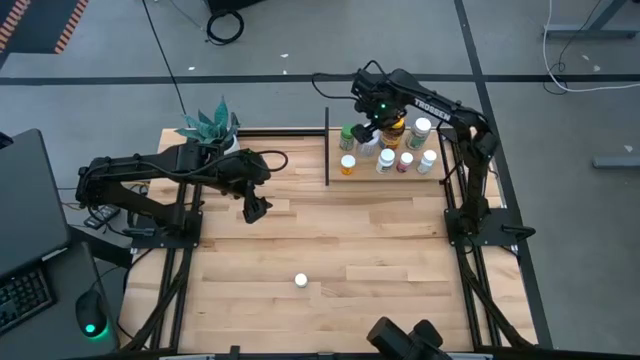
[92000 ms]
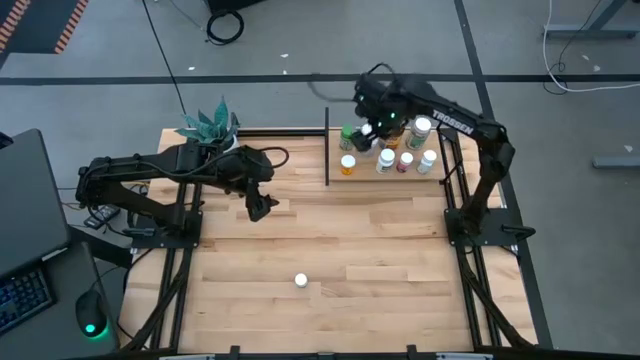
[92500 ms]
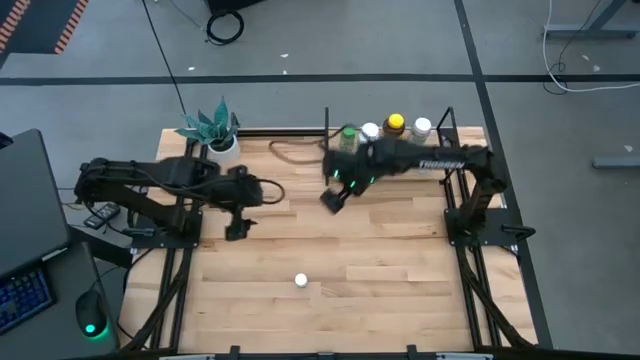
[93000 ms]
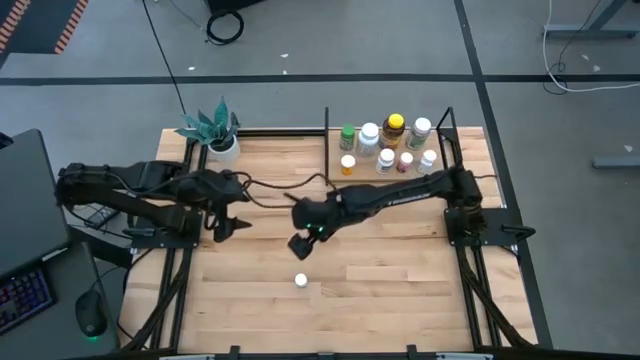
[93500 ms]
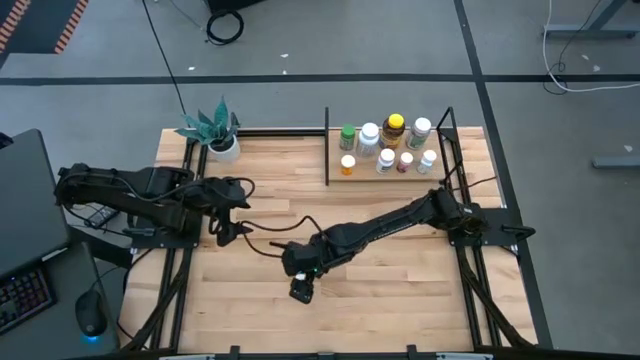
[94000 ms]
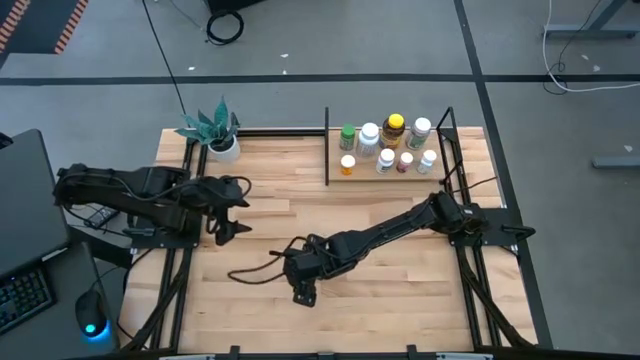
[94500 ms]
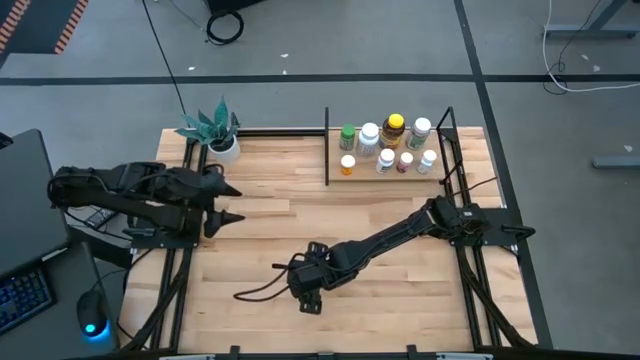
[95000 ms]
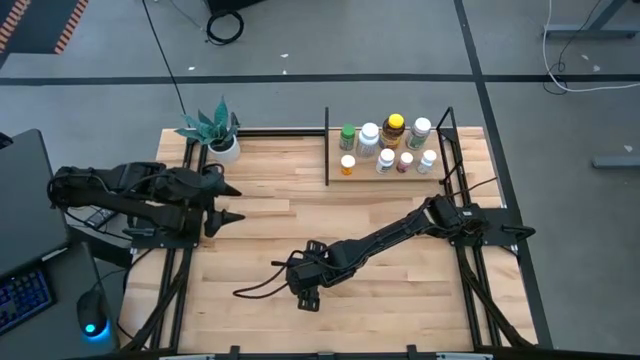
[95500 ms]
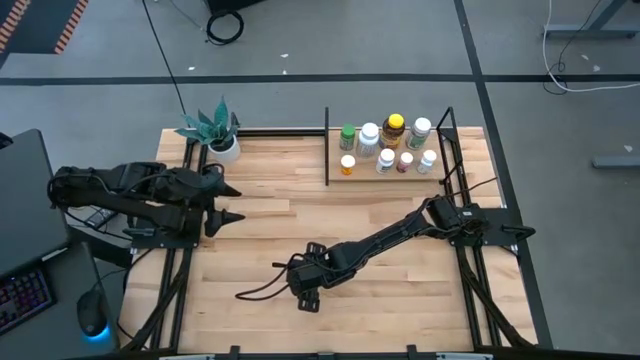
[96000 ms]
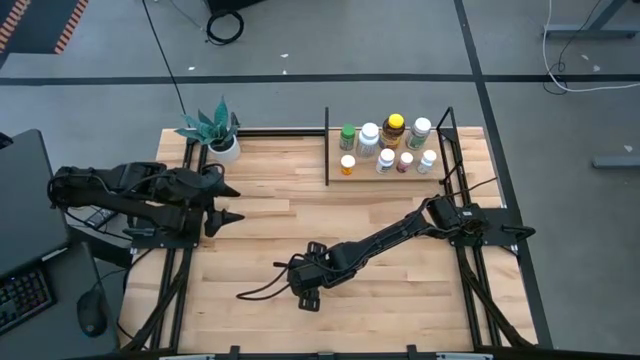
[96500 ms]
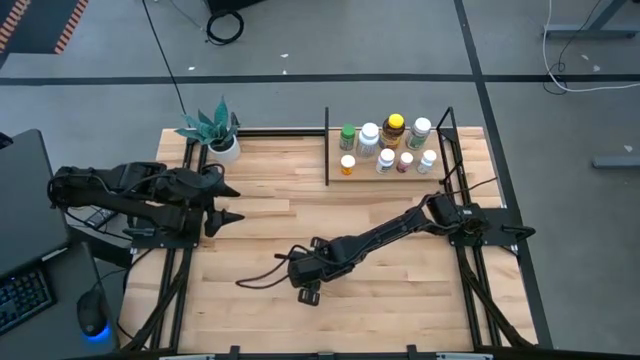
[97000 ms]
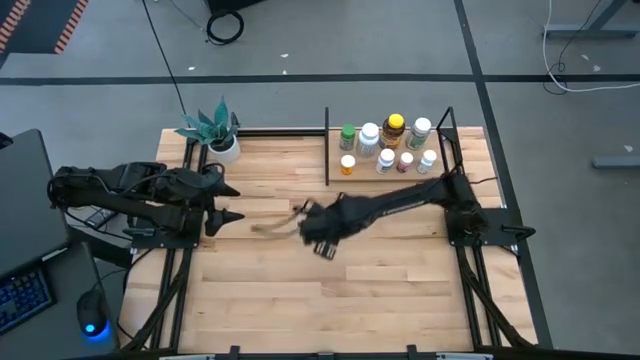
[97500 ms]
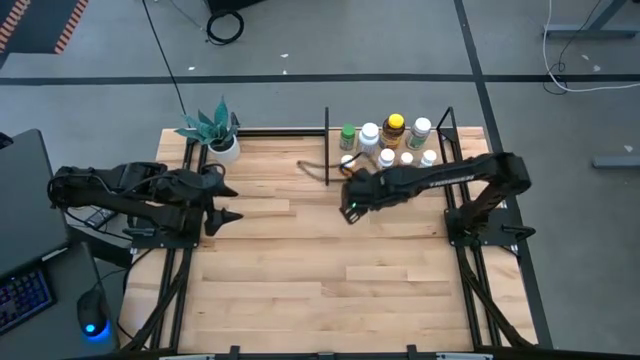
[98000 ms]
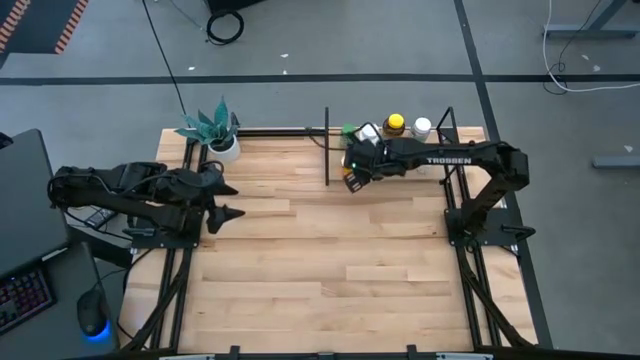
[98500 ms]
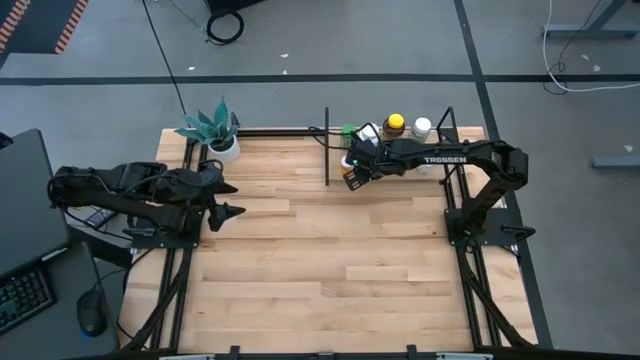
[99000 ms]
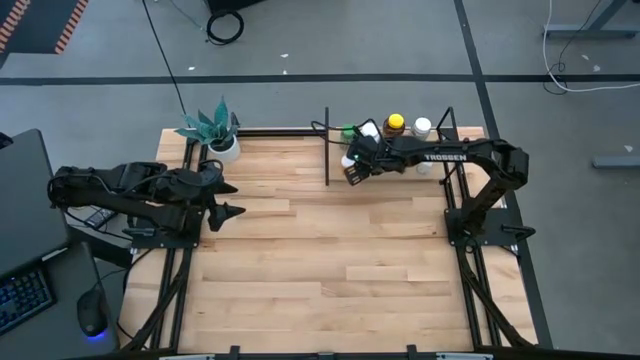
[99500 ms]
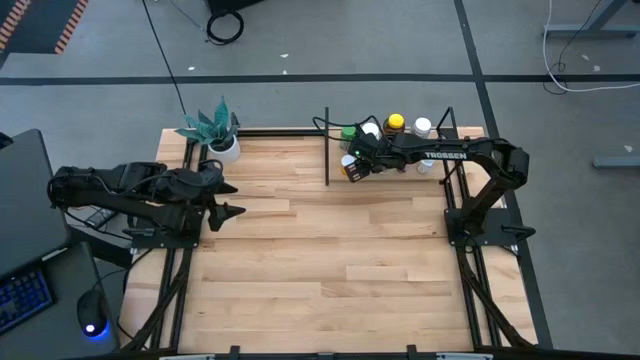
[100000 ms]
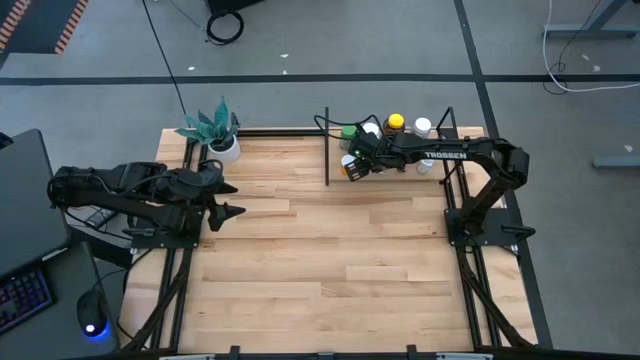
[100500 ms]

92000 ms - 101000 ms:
Task: Pick and place medicine bottles onto shelf by color
Put the black pill bottle on the shelf

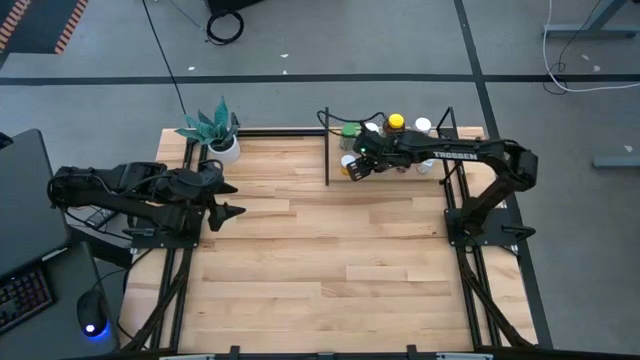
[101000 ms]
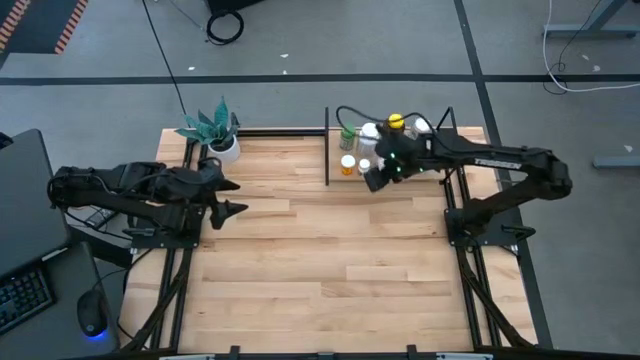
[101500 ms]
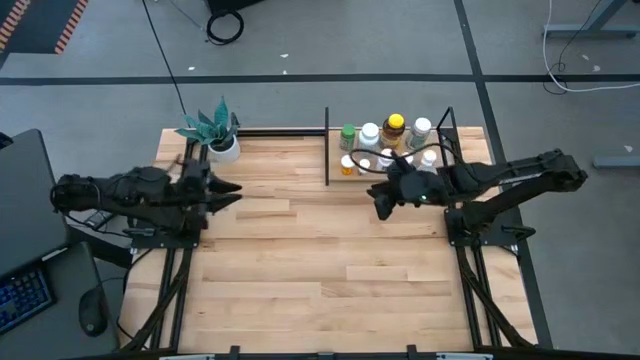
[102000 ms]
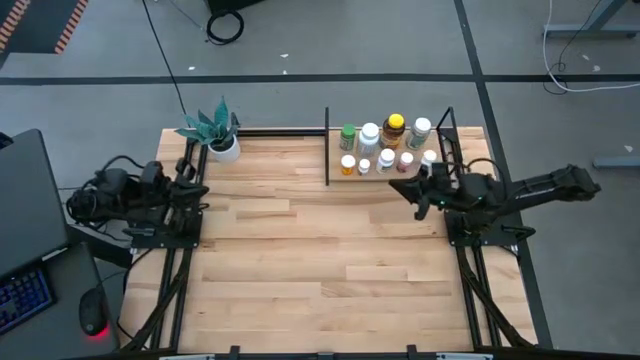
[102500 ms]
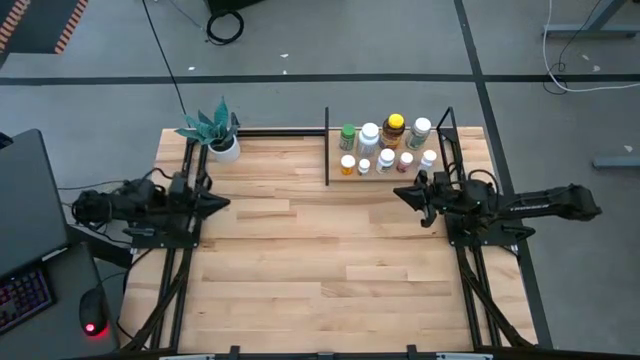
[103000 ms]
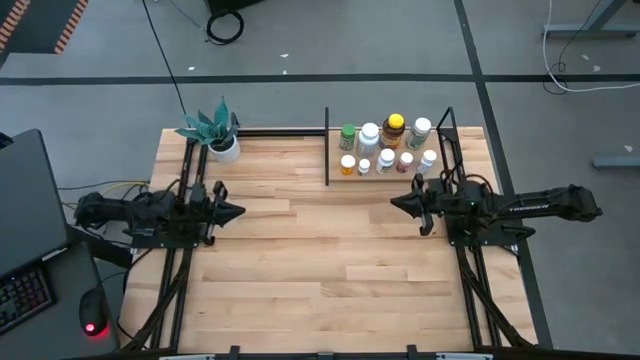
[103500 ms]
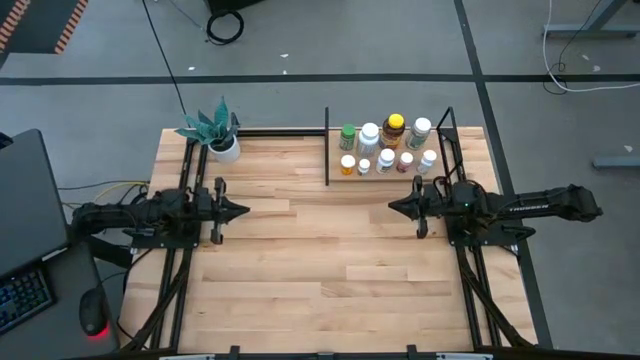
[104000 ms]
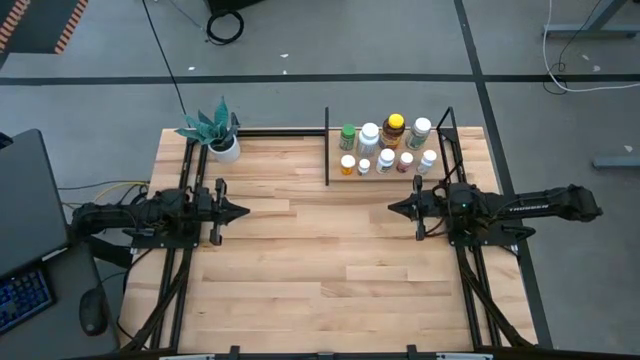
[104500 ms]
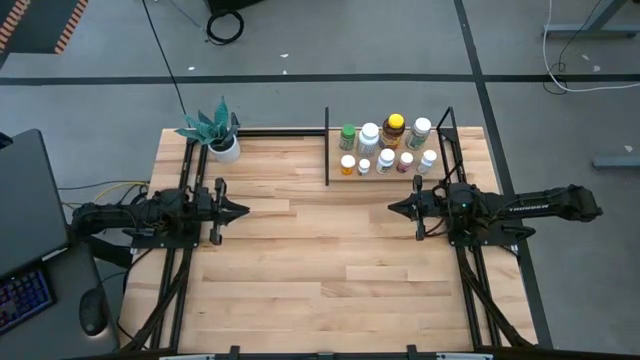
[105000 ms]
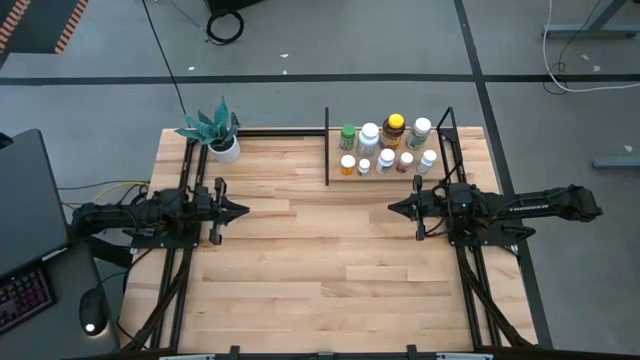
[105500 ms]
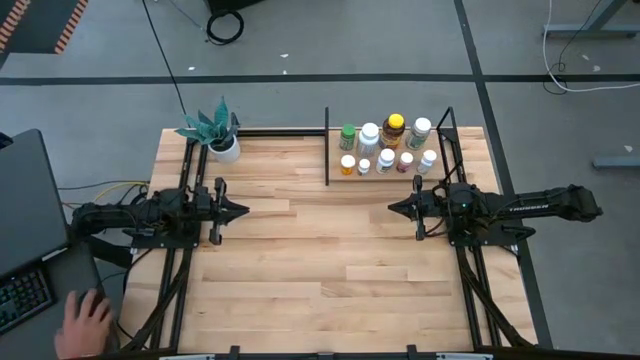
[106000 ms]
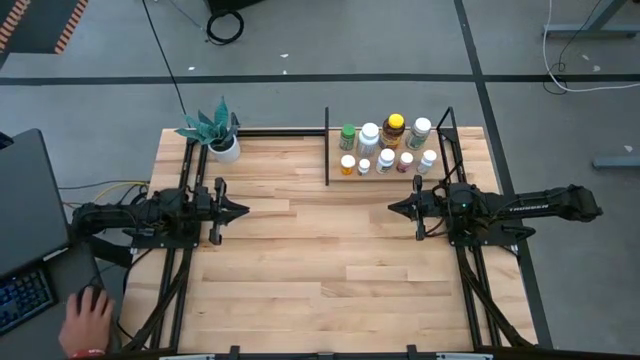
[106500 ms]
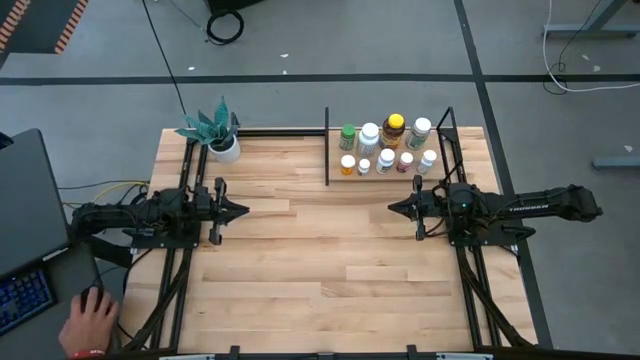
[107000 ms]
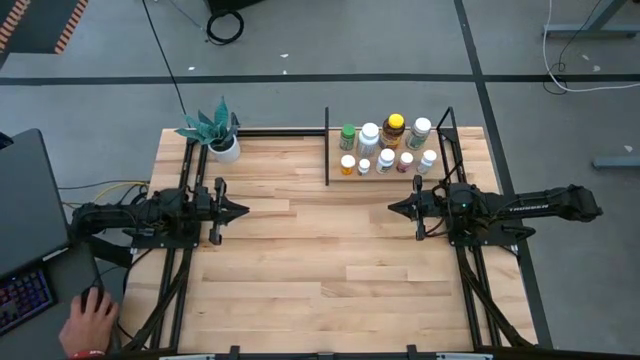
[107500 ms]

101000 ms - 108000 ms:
Return to Home Position

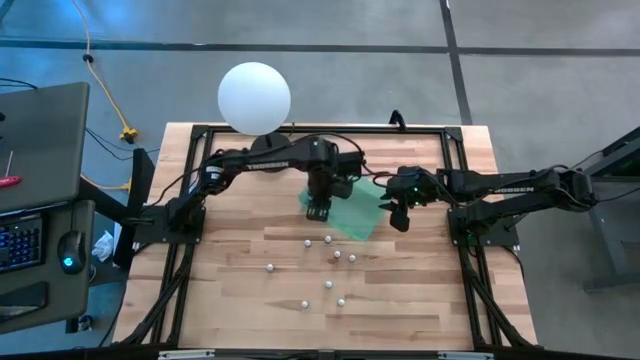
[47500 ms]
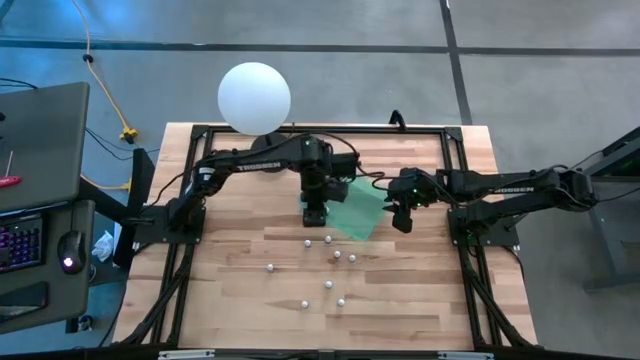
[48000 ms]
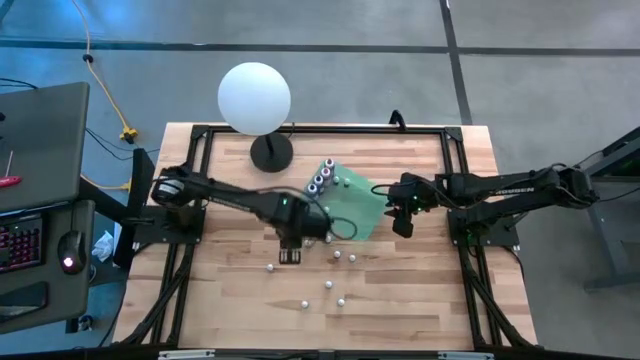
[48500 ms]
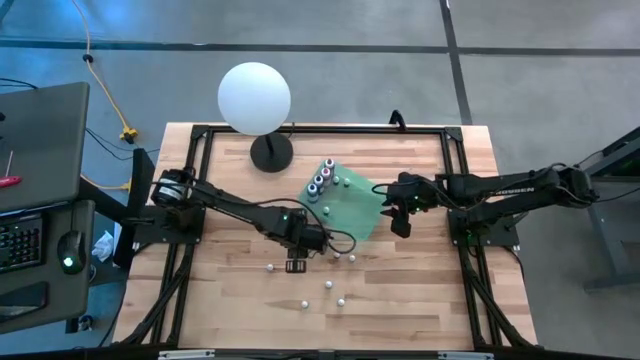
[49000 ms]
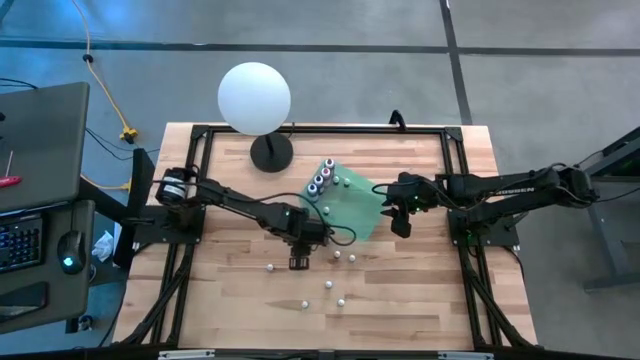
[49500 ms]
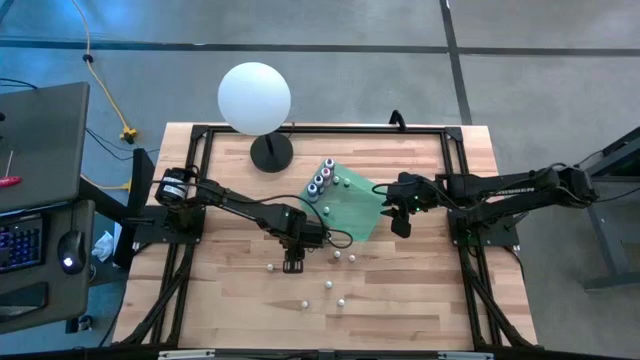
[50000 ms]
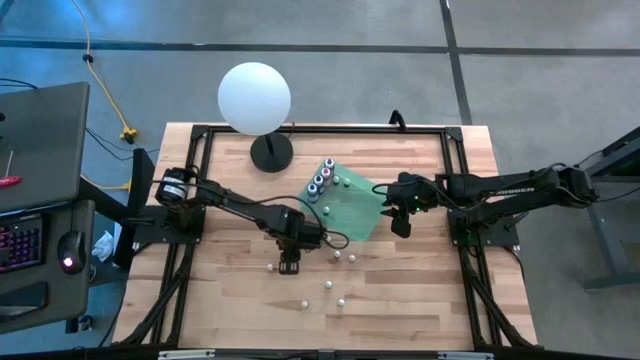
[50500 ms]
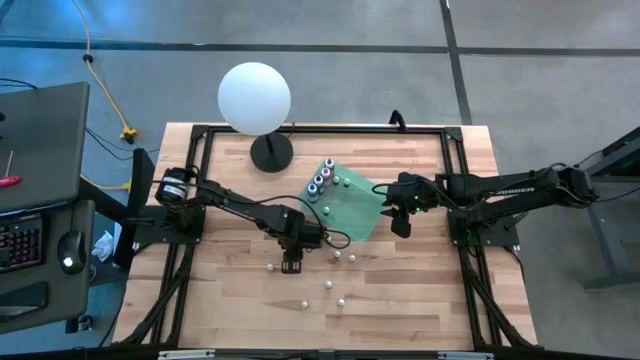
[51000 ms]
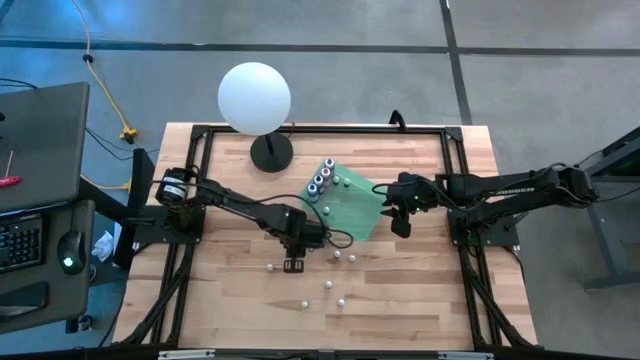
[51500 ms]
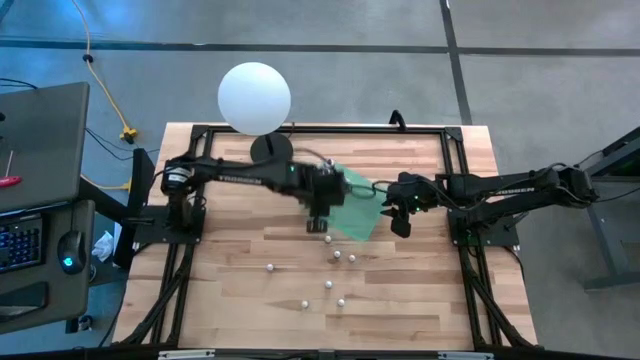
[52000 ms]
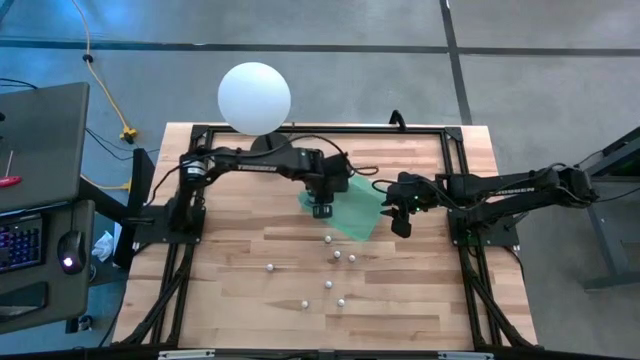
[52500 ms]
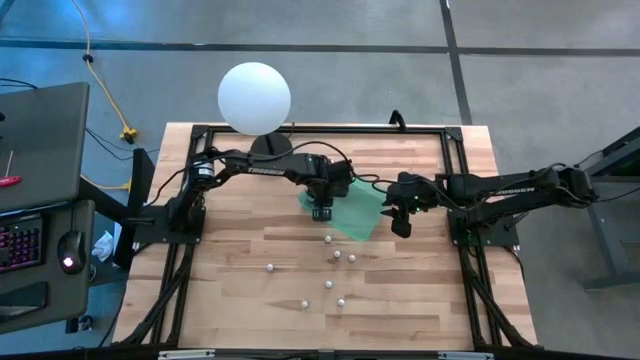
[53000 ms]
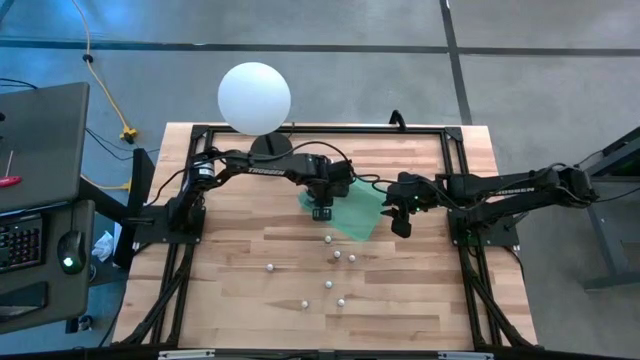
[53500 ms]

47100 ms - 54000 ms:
Task: Pick & Place food coloring
Put the left small red food coloring bottle into the green container
